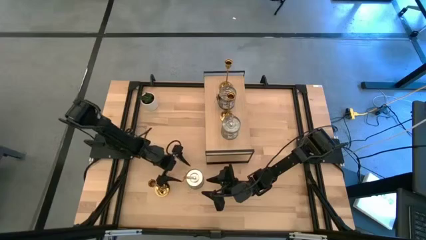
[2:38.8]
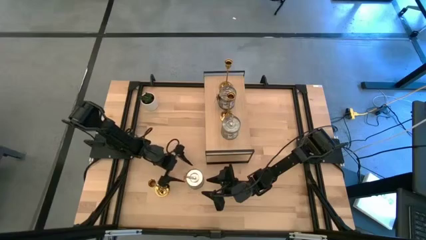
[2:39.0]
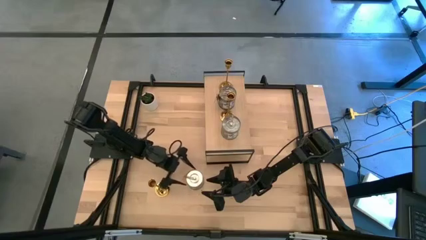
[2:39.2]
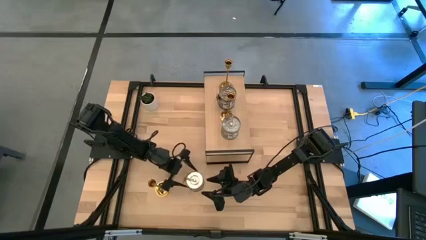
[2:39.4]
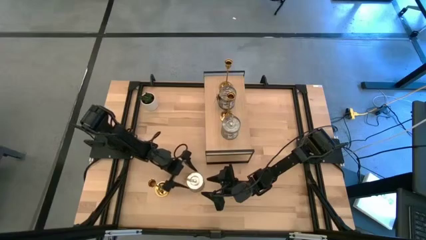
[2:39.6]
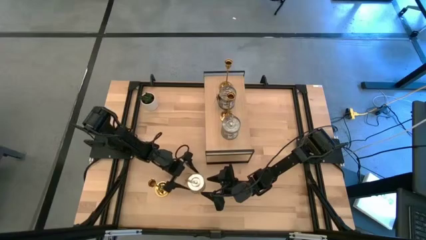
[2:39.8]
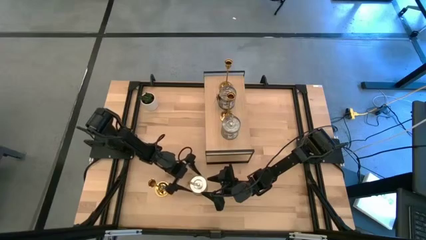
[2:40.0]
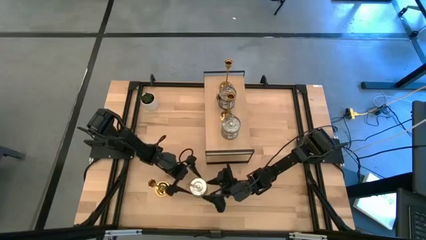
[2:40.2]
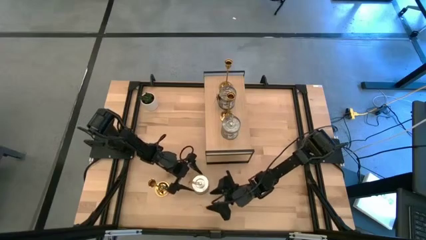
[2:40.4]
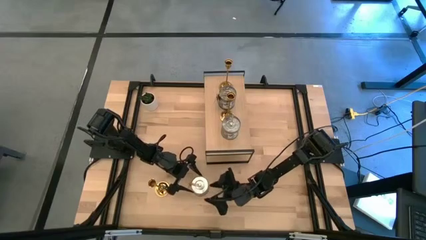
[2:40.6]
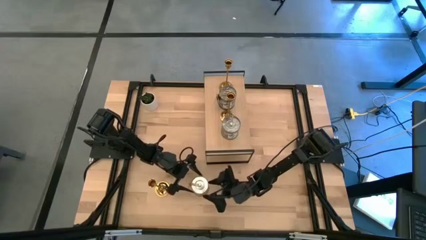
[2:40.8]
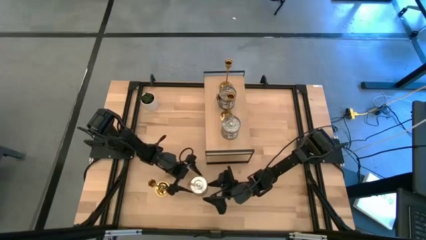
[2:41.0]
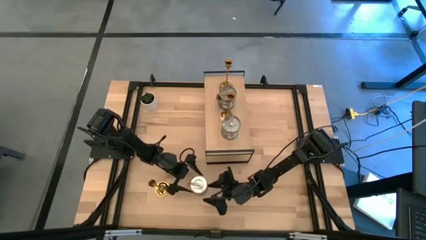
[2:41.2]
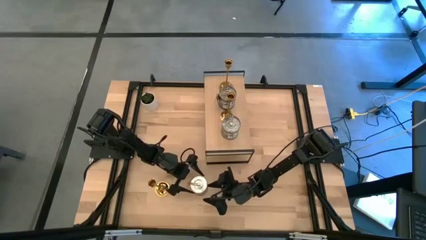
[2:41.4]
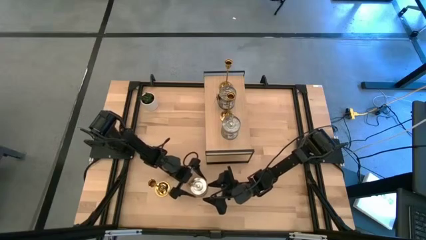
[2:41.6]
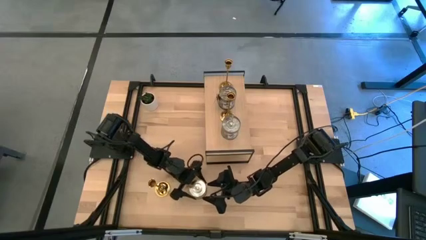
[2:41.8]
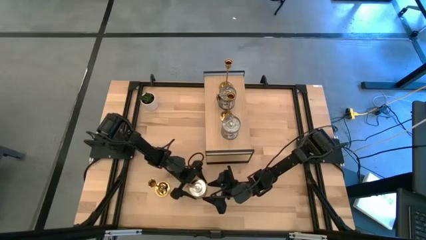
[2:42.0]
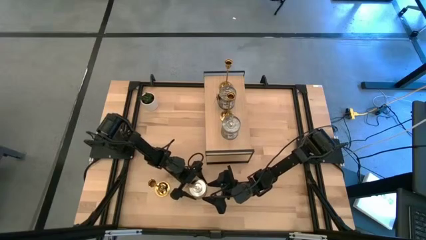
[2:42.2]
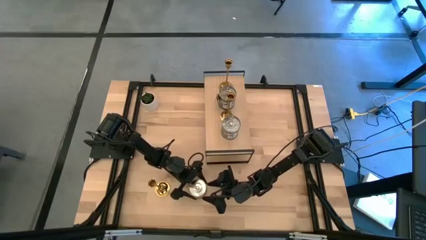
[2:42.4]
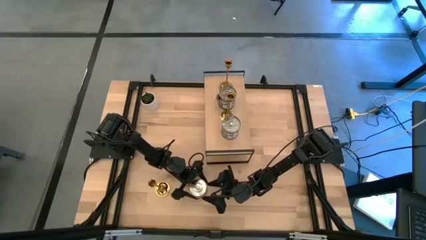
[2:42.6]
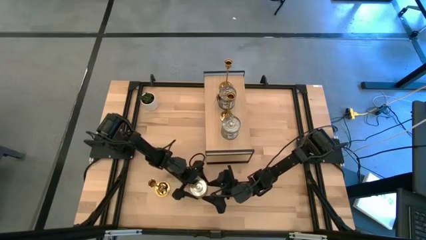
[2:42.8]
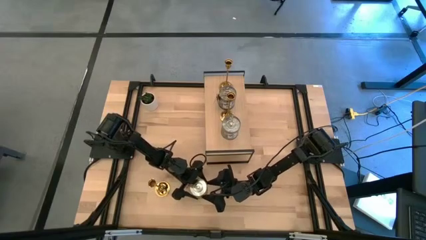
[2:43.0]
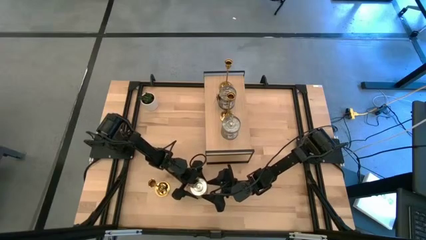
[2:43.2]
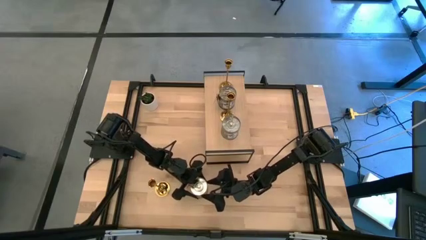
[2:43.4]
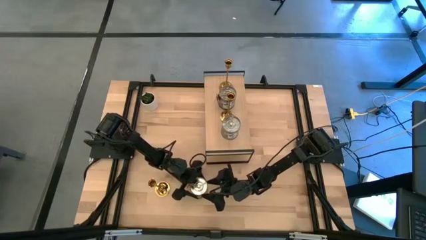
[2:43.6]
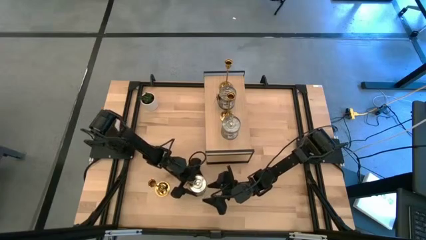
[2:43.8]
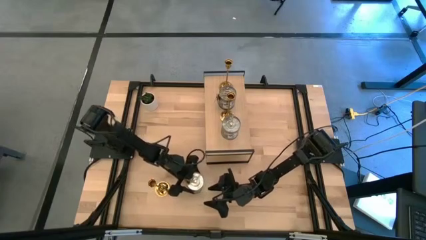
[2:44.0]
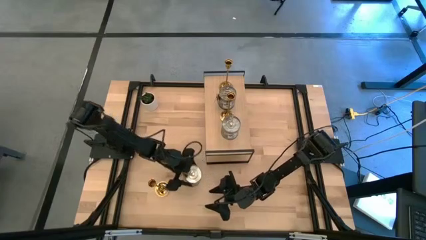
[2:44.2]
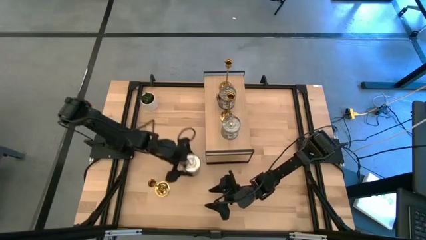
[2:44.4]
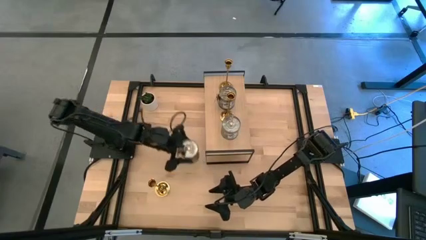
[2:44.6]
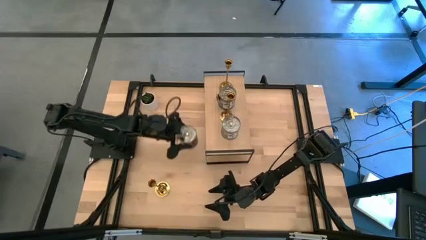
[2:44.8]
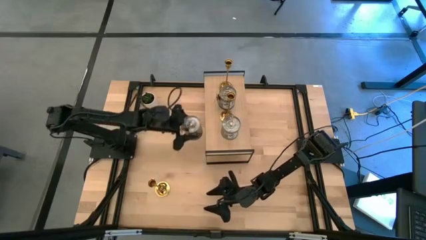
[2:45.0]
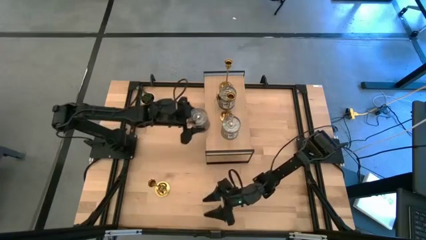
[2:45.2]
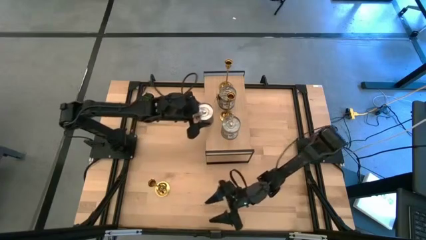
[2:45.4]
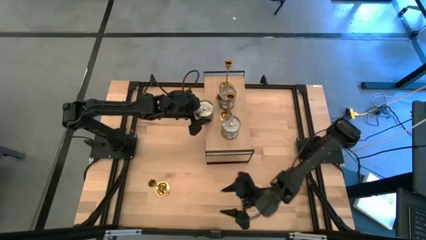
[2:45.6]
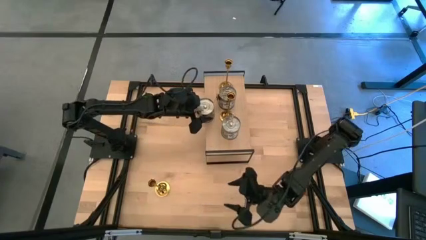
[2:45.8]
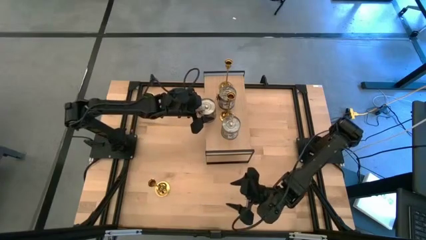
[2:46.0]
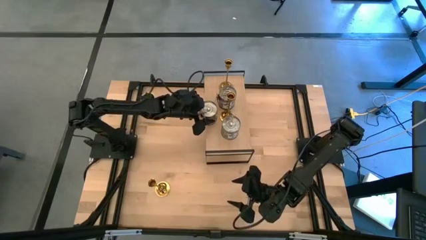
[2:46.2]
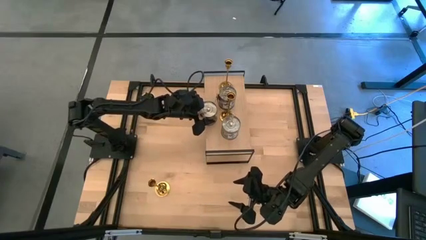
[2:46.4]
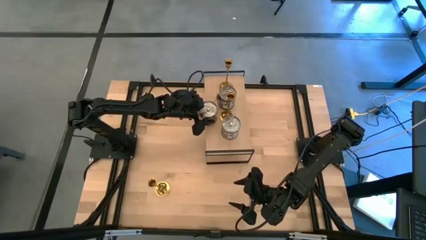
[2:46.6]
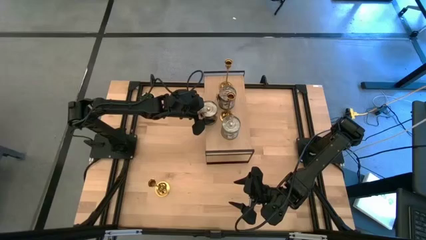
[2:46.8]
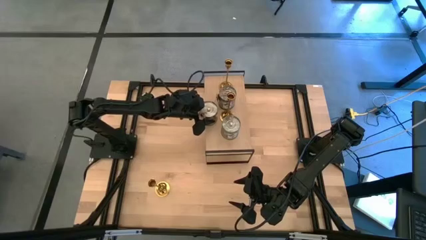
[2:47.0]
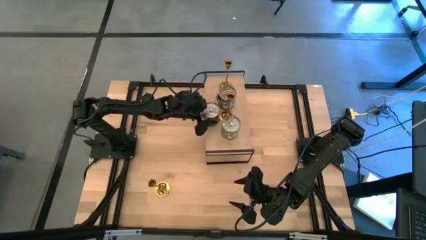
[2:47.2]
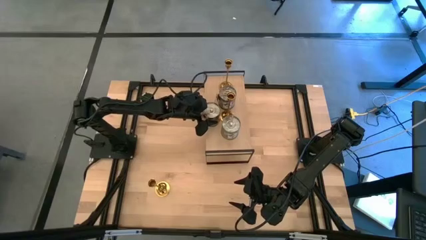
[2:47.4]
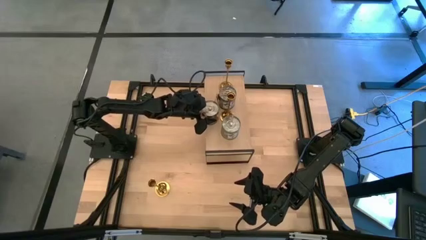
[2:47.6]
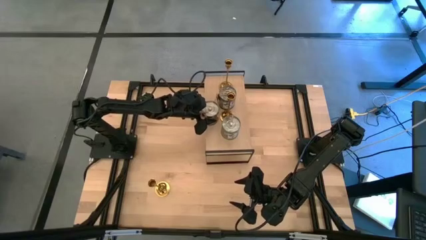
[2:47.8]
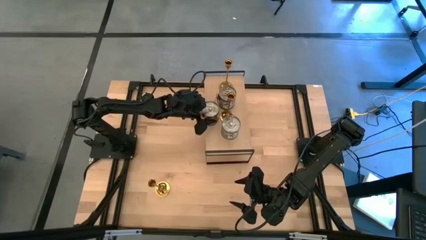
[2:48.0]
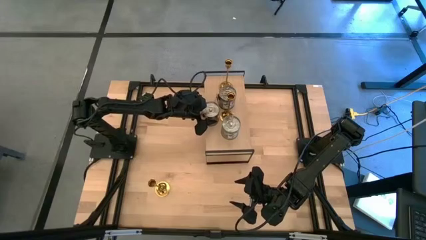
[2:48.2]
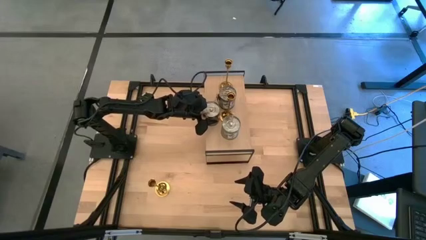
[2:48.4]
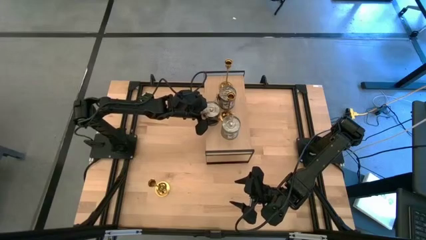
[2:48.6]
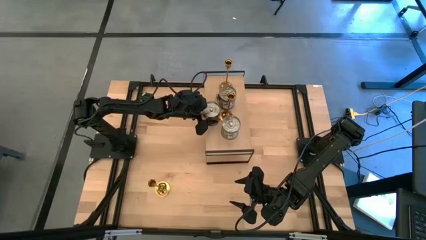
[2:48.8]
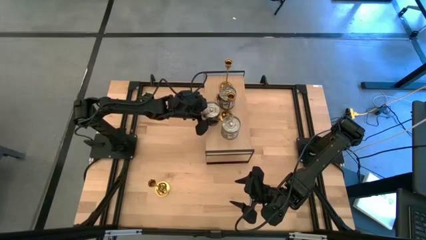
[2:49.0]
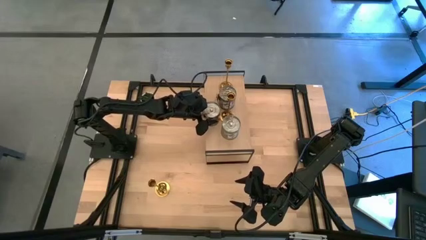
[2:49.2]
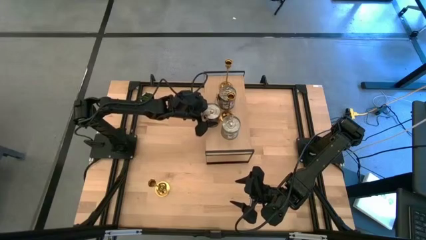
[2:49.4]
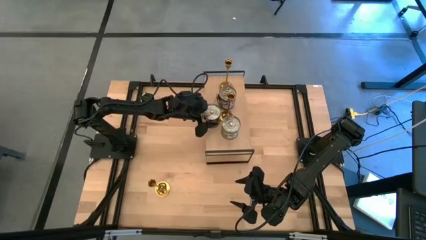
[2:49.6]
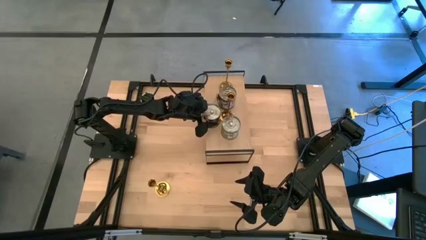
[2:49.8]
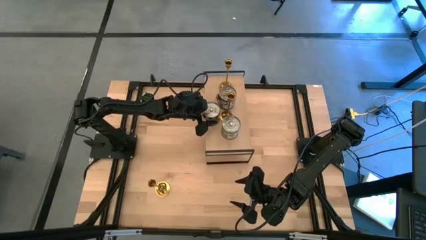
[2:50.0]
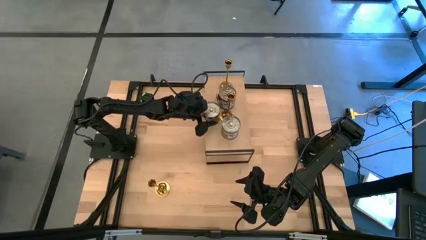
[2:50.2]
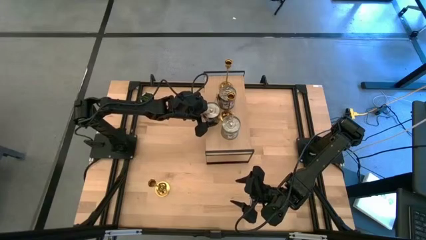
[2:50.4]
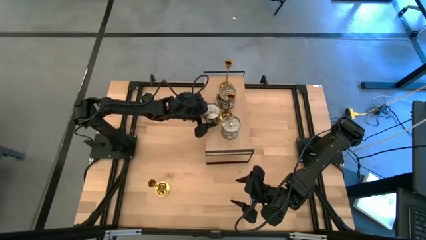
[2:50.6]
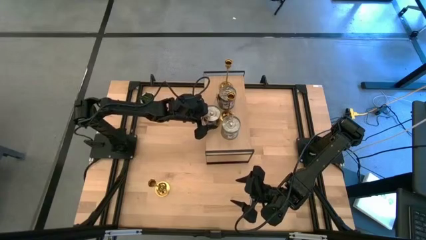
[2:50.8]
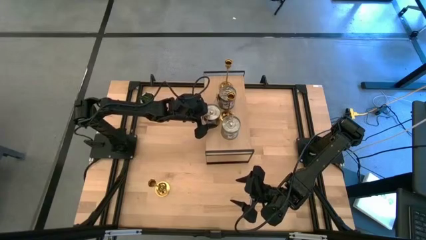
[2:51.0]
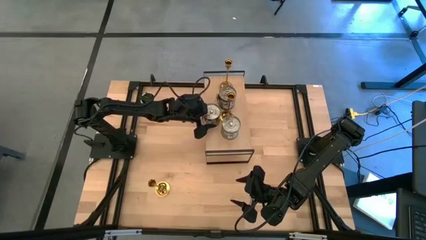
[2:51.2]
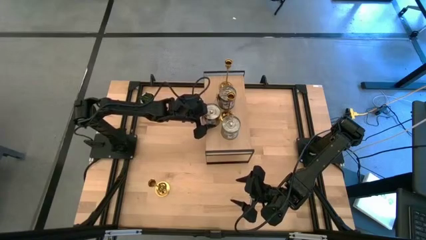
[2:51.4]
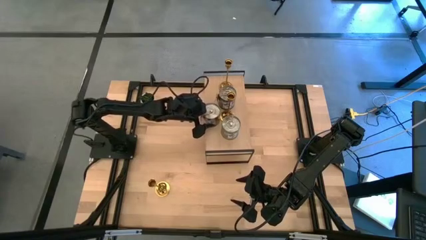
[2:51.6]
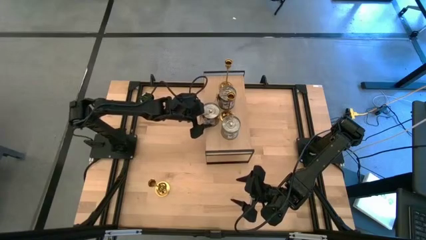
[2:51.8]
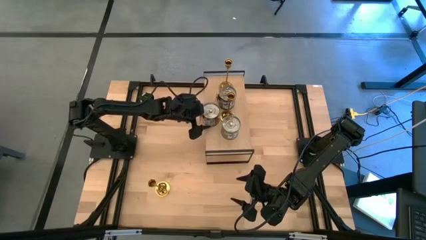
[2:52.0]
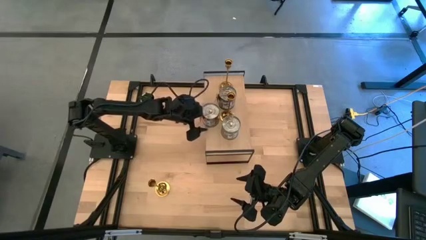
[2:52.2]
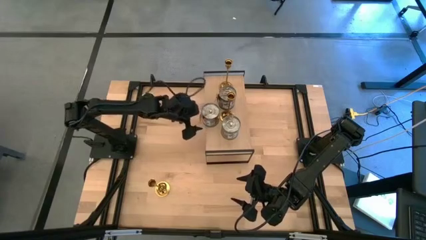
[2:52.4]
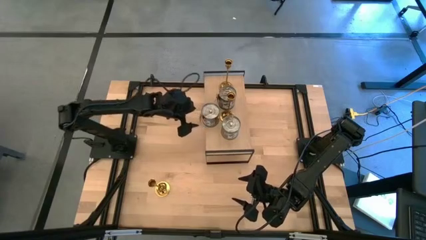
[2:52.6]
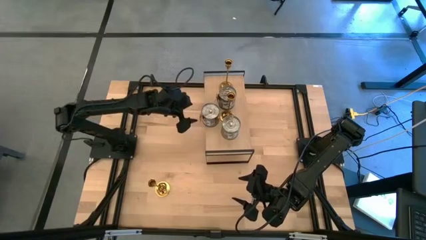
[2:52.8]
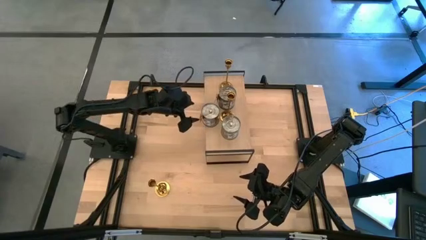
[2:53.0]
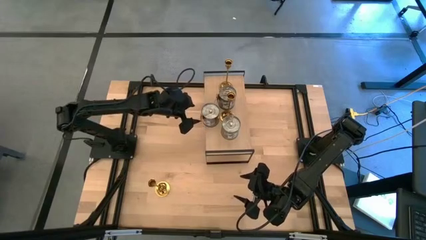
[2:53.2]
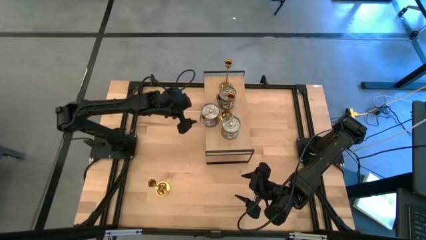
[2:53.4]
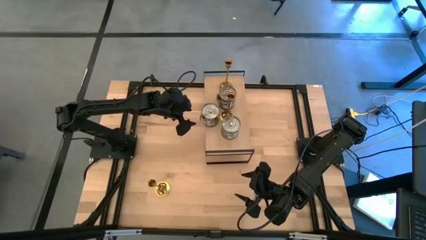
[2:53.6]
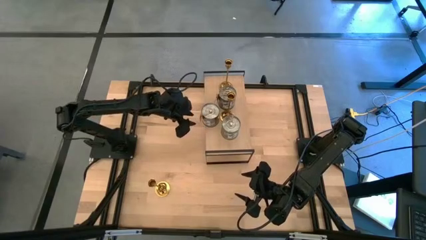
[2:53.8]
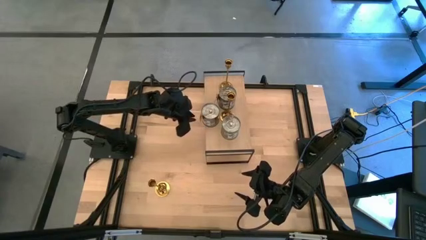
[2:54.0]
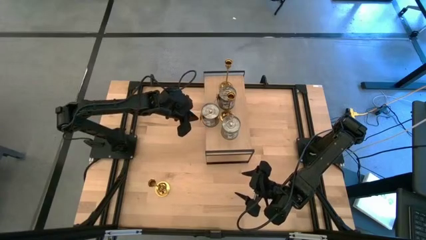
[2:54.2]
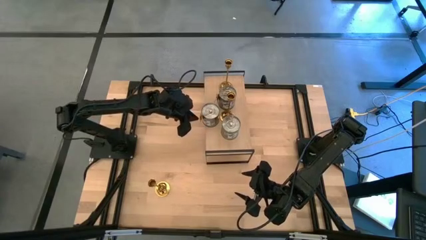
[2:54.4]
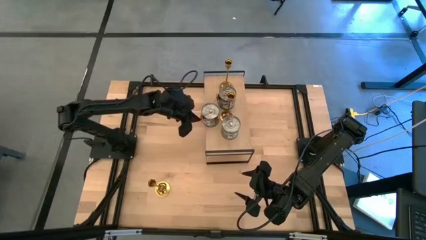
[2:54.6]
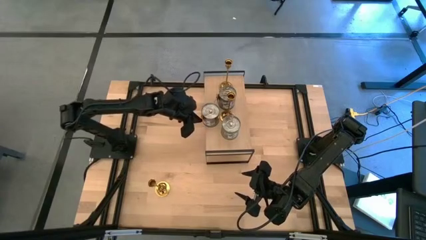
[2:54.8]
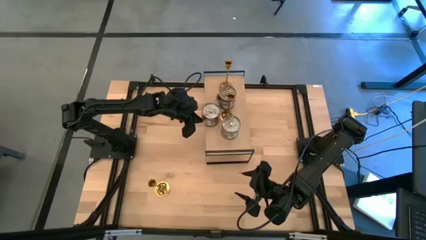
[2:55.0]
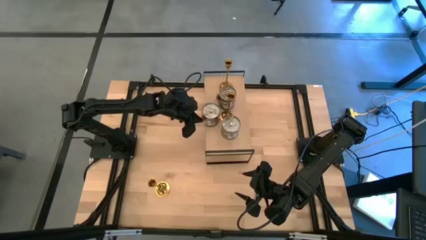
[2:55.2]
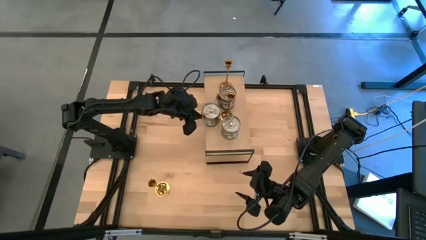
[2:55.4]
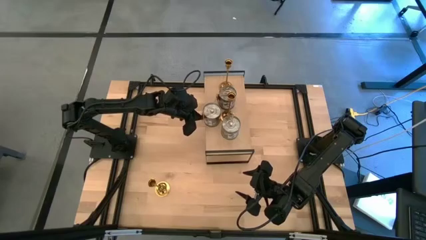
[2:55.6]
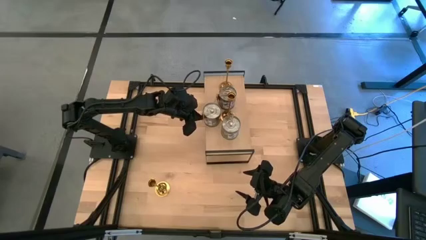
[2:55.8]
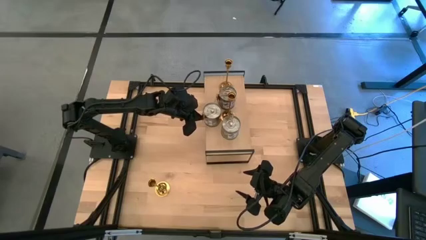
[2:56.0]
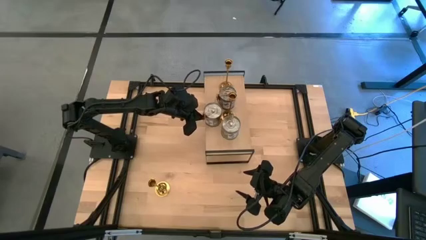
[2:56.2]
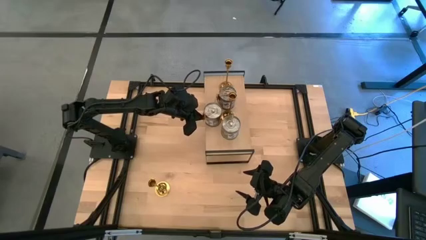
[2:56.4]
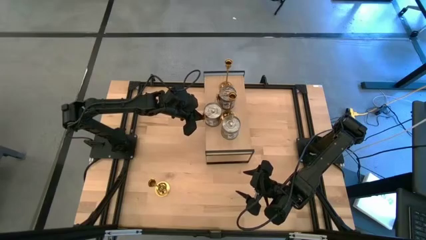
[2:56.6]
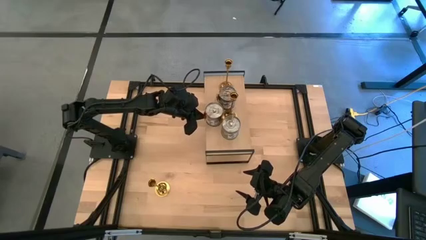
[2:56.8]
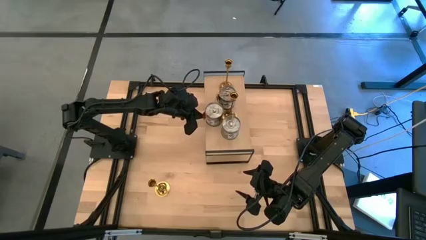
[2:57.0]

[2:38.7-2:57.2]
Task: Pick & Place candle stick holders
Put the silver scented candle on the shelf
